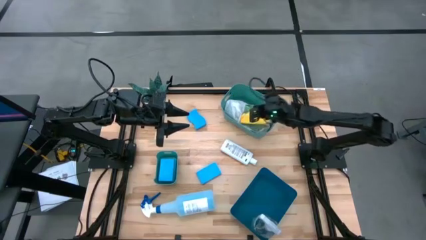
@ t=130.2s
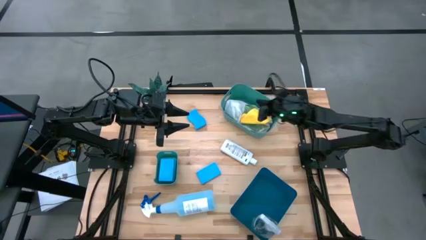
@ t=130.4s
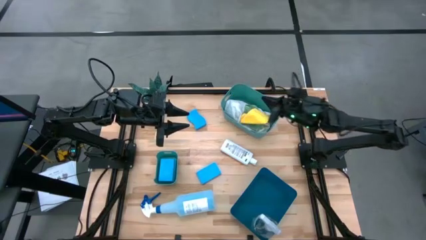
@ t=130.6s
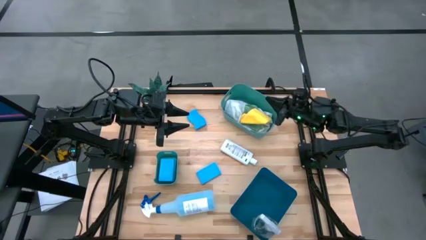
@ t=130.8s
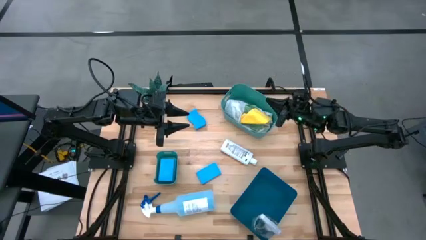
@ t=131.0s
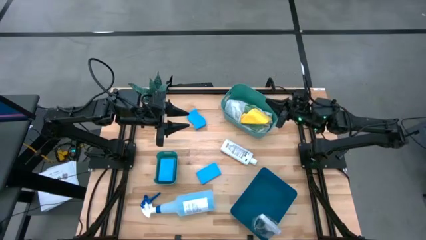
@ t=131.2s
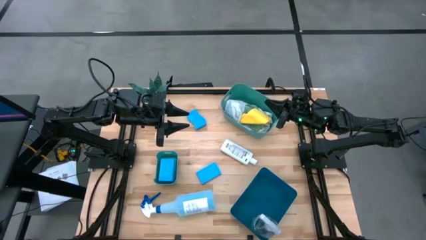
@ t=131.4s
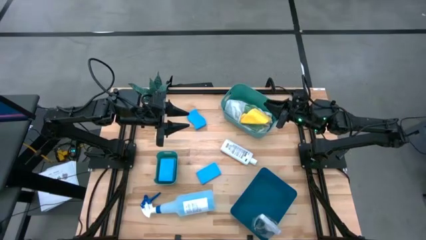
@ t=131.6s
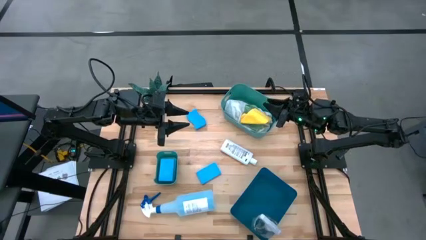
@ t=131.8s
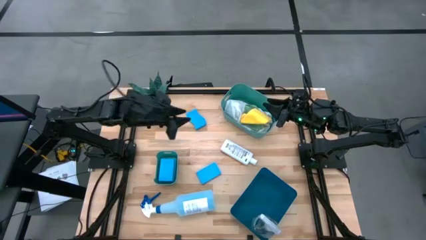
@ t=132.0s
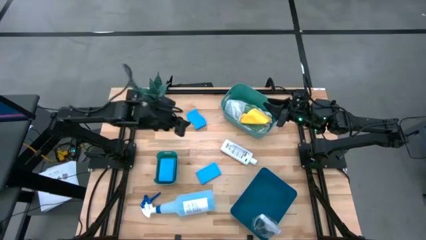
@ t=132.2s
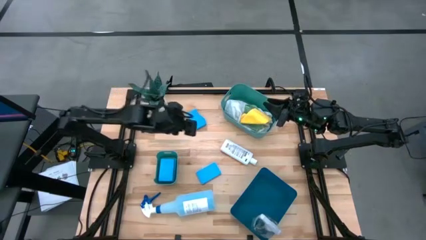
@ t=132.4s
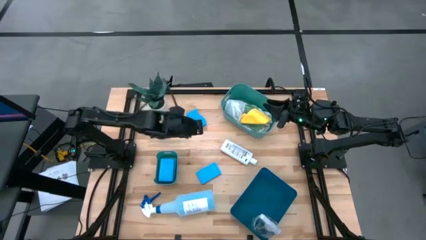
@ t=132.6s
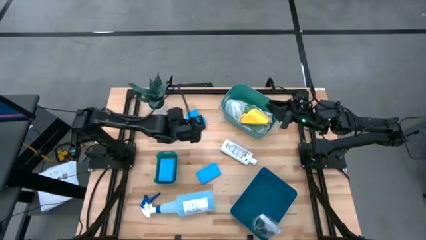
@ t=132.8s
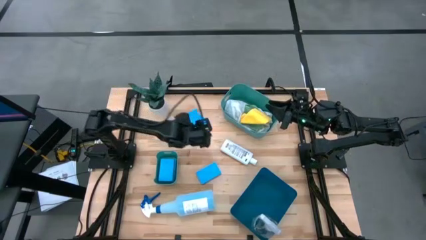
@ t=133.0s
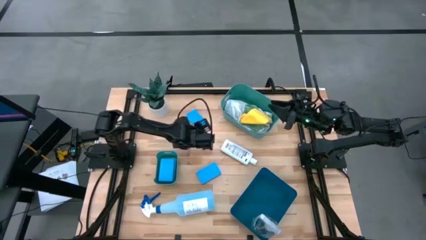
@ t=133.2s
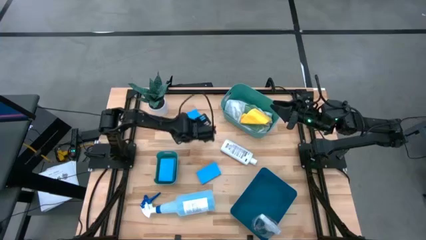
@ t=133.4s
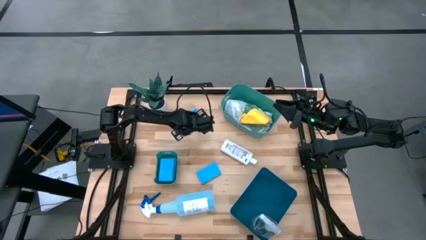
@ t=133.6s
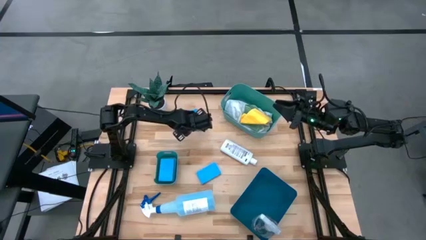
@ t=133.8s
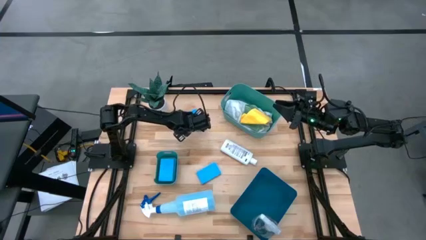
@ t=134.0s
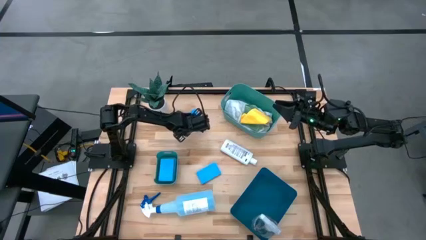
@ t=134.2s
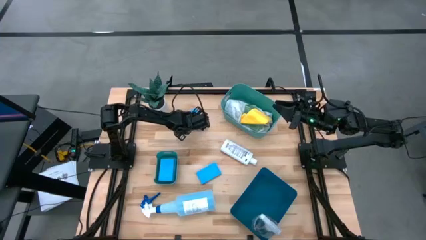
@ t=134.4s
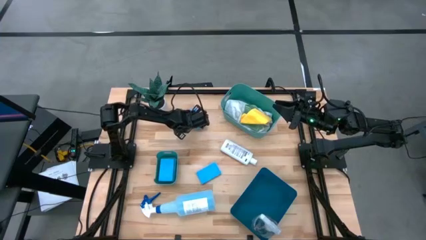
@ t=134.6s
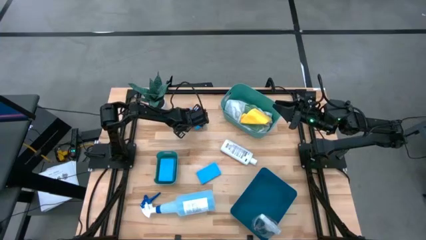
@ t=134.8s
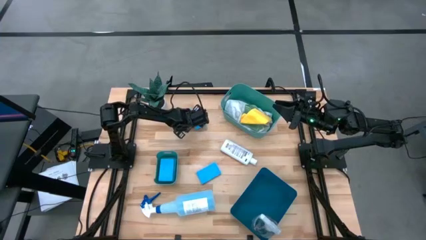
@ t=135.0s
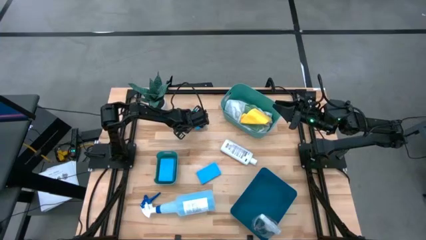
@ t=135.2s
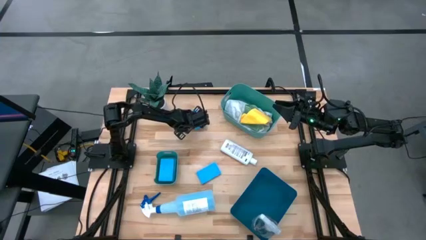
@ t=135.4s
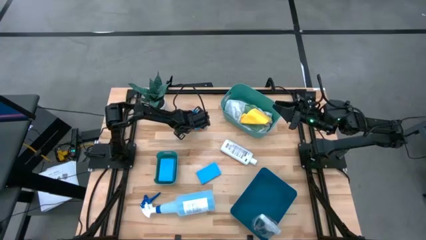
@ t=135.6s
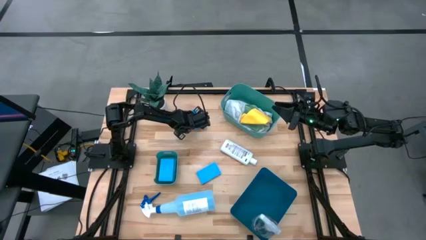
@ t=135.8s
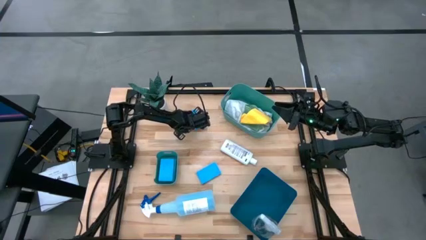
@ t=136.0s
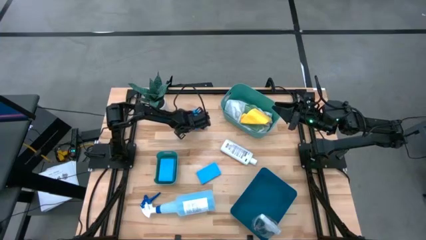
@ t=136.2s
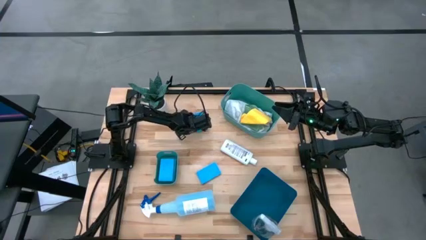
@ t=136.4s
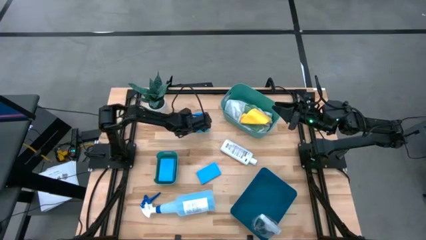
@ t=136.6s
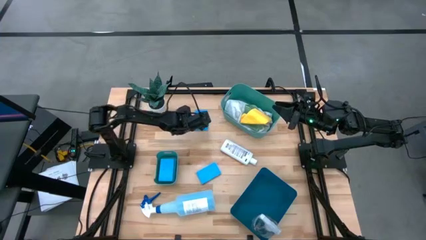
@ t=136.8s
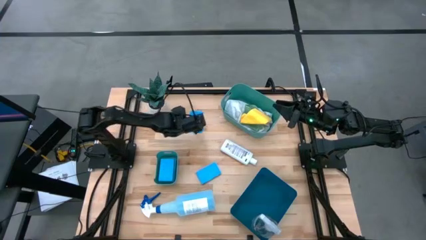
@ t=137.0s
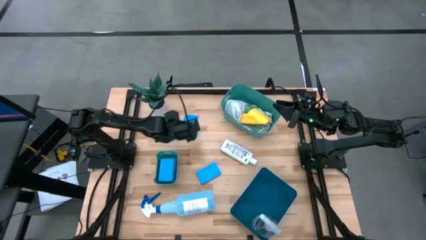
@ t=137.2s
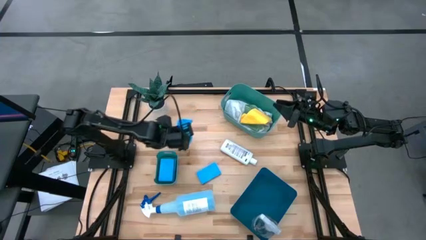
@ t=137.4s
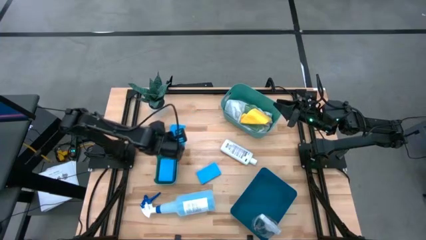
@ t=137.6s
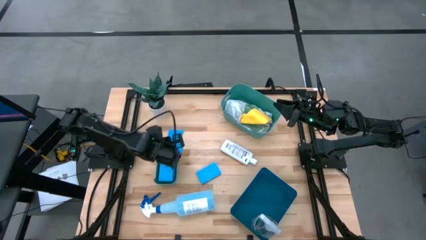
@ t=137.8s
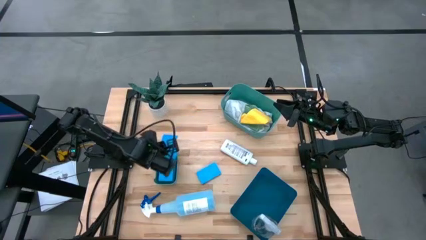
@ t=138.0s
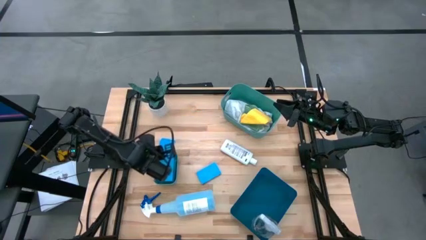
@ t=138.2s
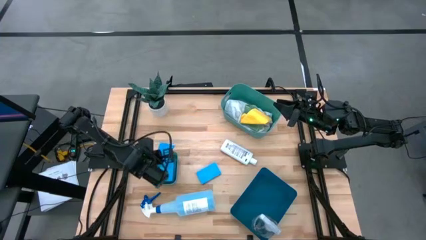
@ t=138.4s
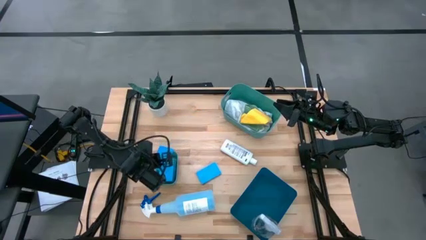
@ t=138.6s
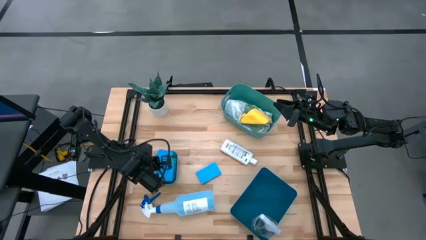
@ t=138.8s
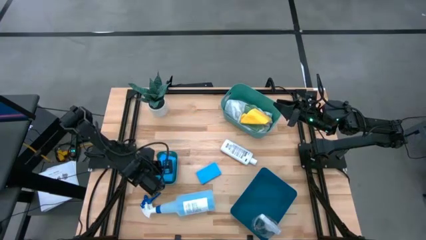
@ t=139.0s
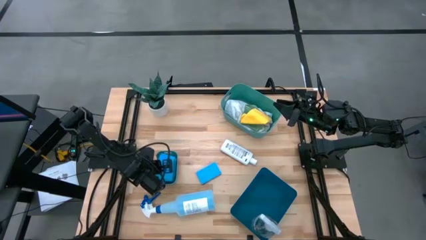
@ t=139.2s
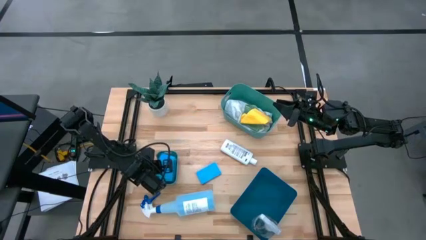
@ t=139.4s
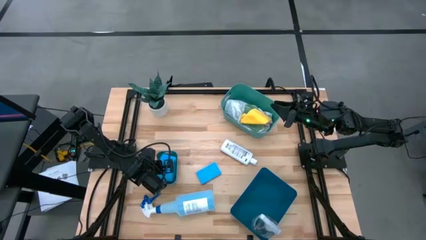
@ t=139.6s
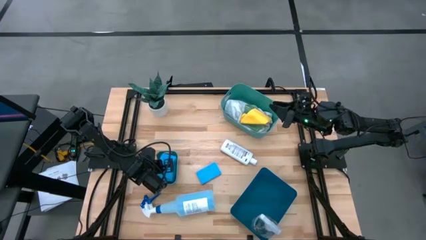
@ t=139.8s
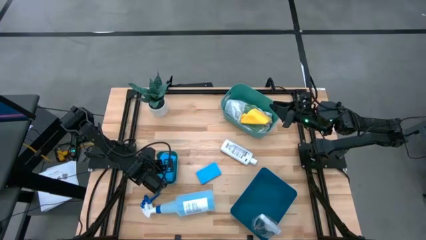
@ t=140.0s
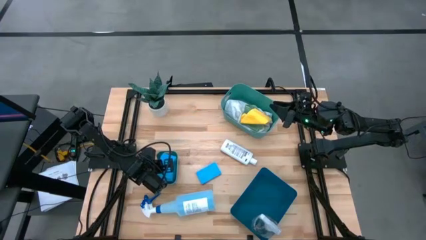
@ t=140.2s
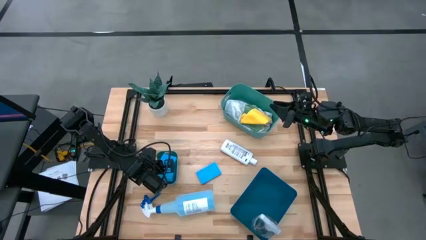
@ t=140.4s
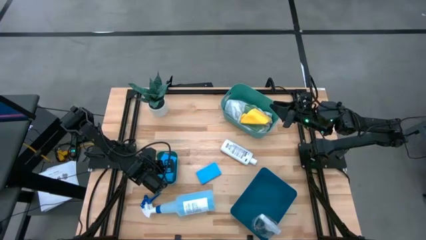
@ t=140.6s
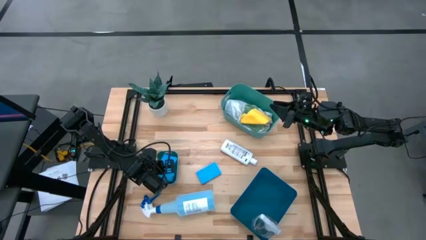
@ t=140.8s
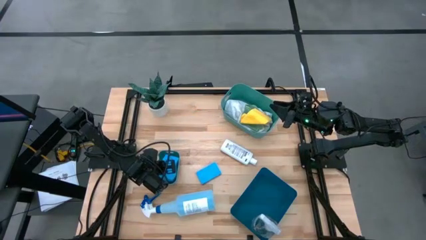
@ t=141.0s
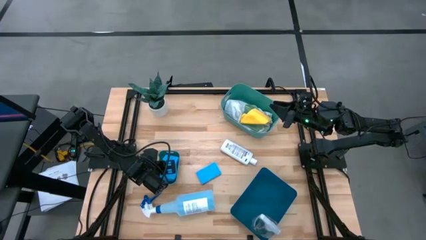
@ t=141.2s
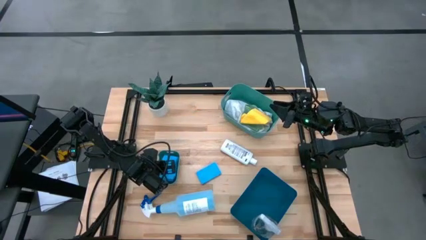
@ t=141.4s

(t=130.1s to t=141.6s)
Task: Pick & Place Kitchen Items
Put the blue sponge into the small green bin

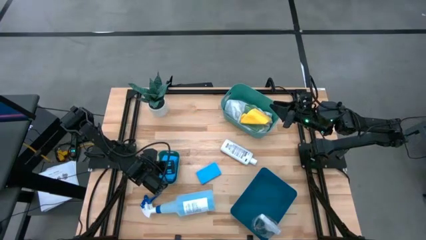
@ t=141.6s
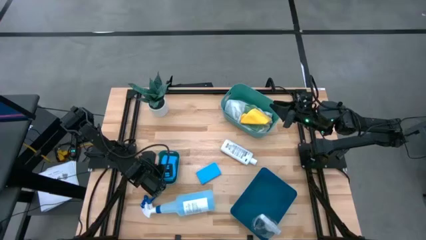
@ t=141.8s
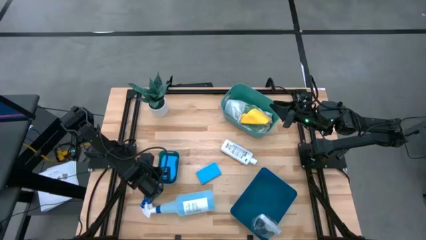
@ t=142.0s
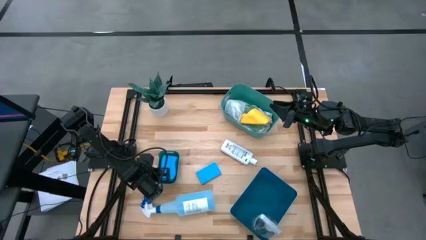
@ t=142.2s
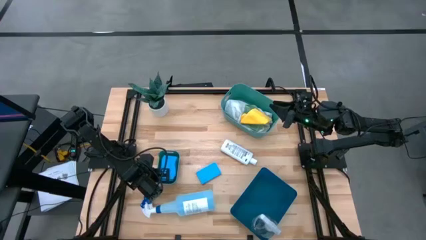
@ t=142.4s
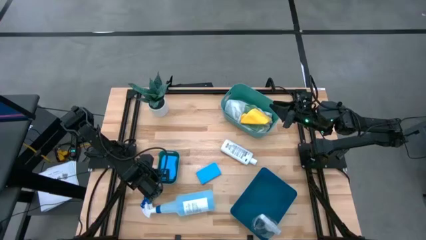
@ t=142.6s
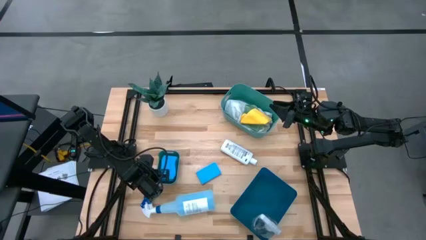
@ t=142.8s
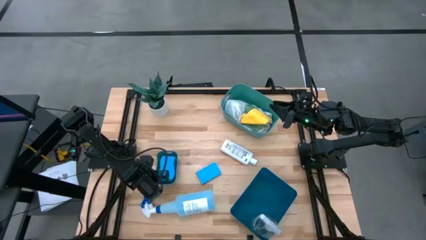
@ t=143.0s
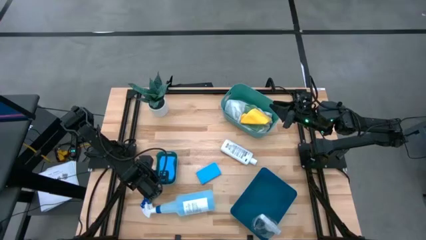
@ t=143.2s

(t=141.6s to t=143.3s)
Adjust the small green bin
